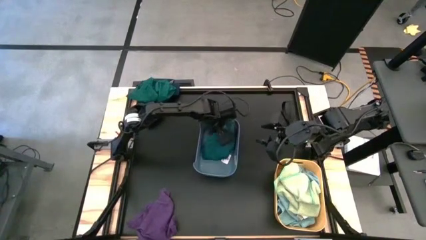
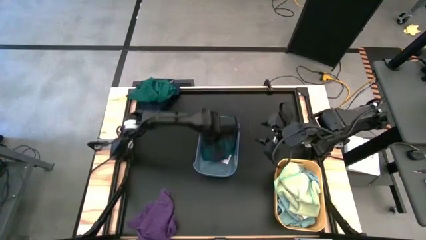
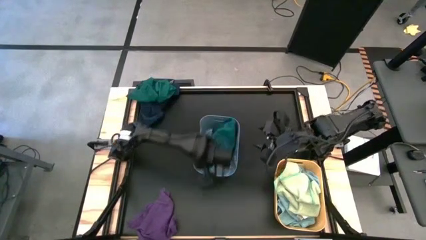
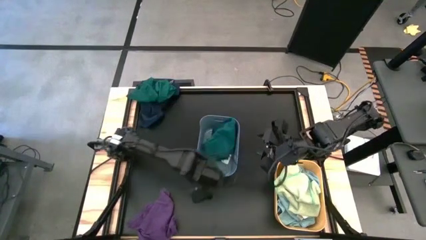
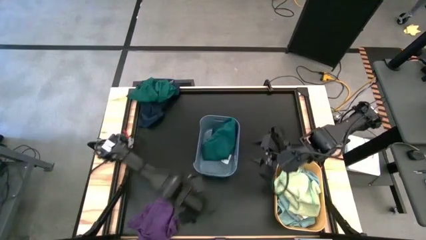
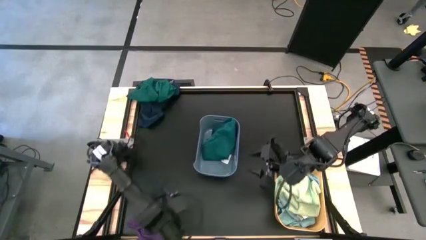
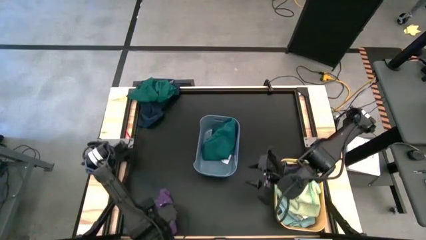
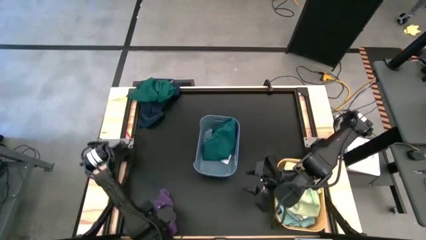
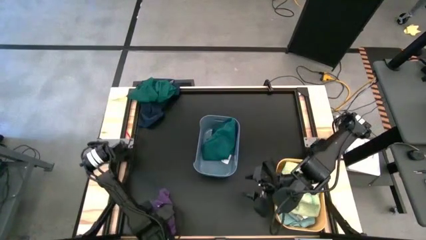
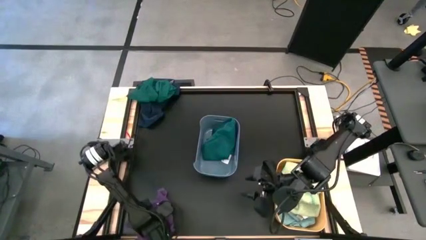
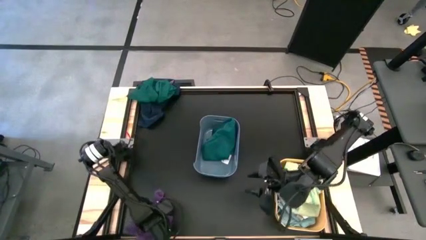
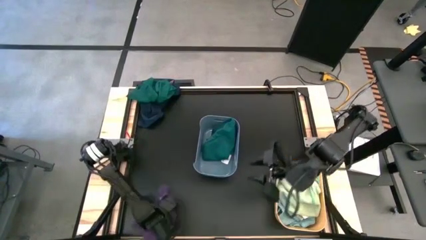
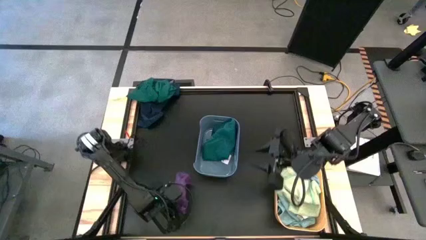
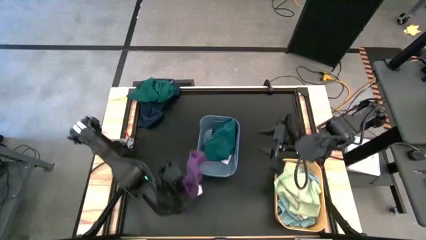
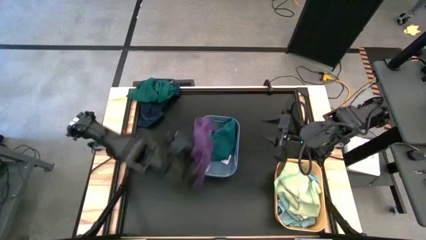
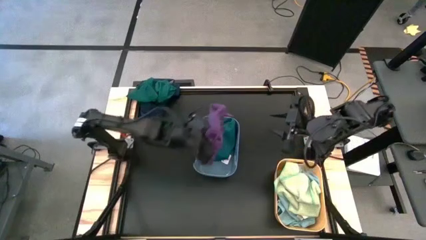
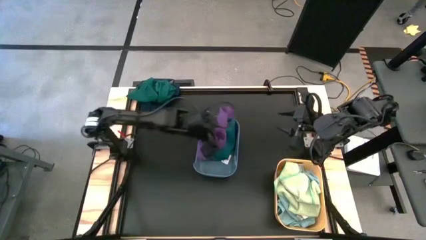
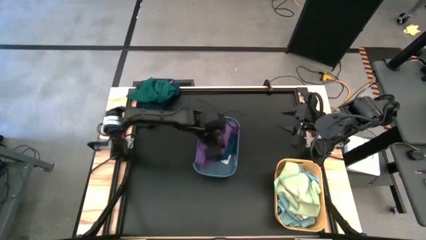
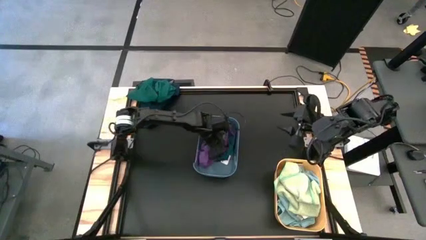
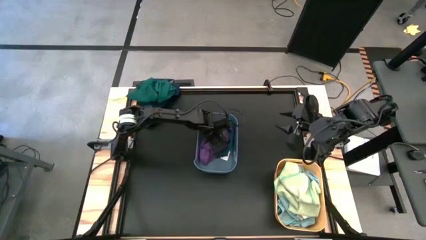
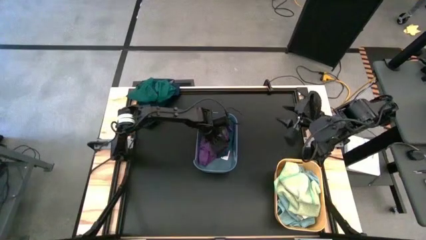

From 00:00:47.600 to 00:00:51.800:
Task: Sort microfiber towel by color & place in baskets
Put the purple microfiber cloth into the blue bin

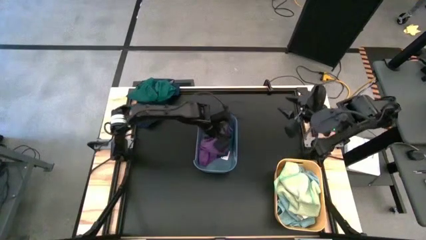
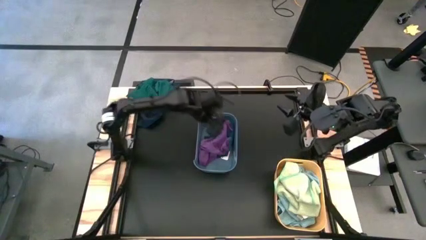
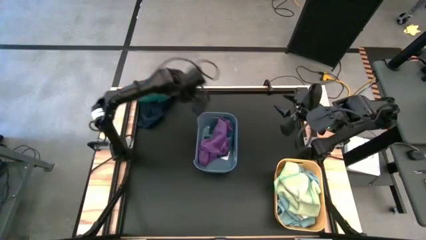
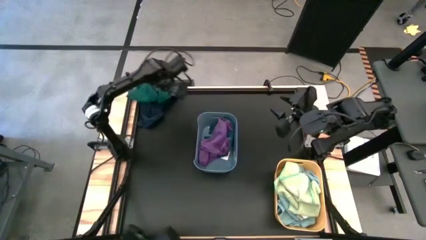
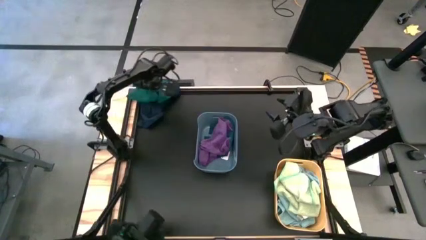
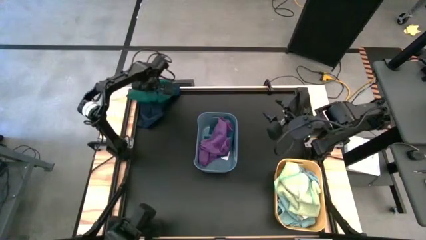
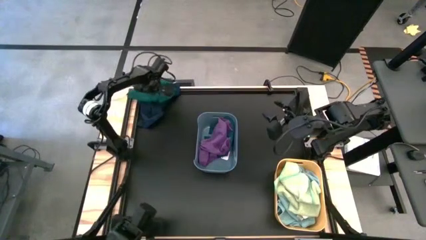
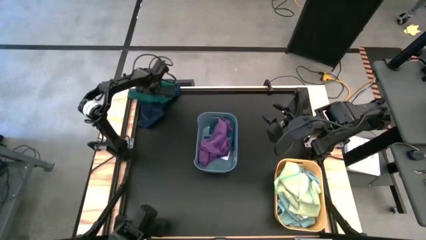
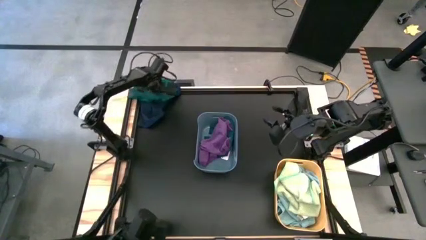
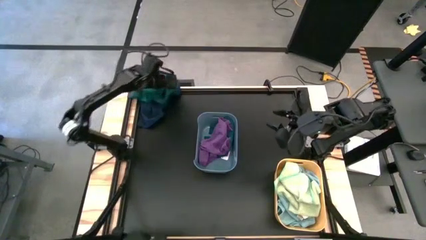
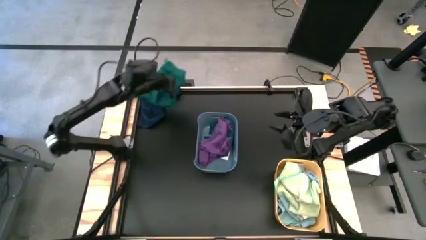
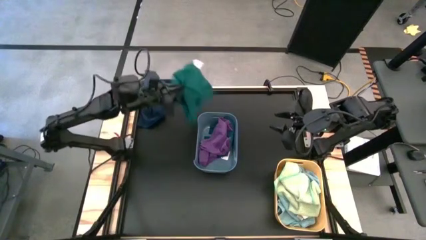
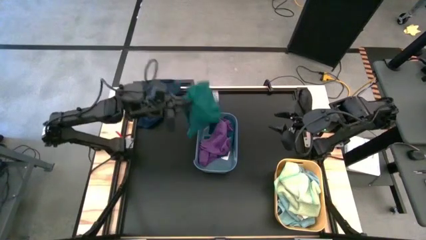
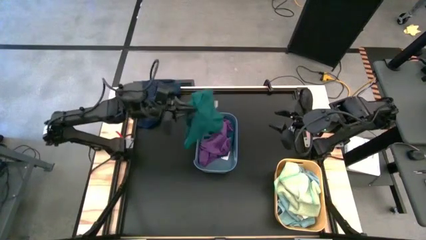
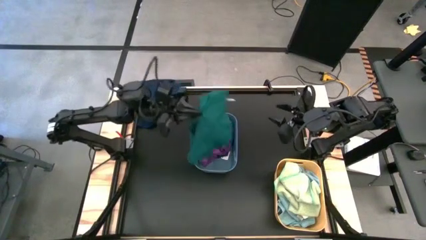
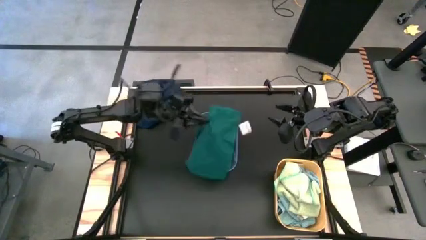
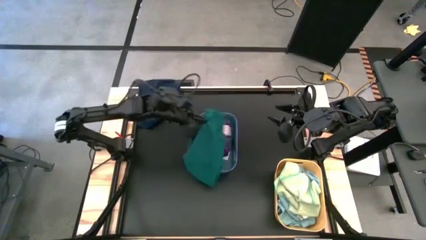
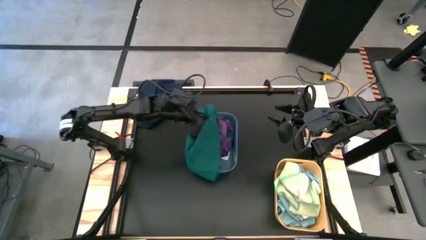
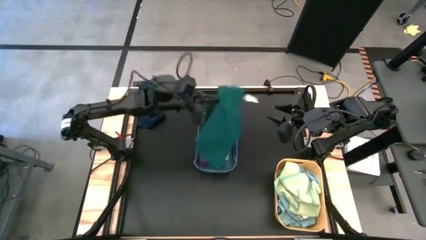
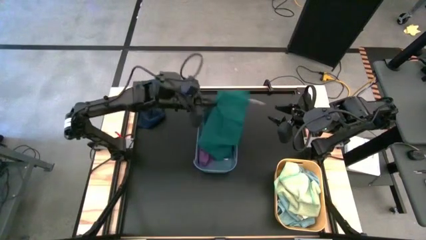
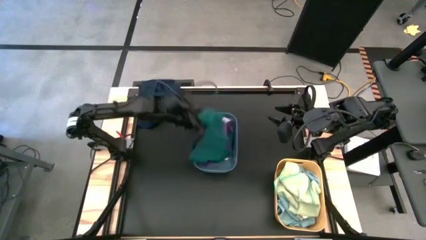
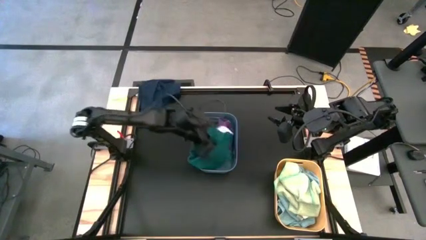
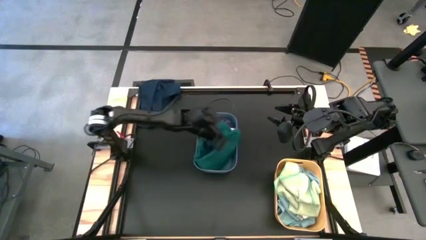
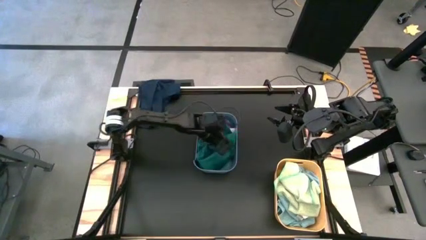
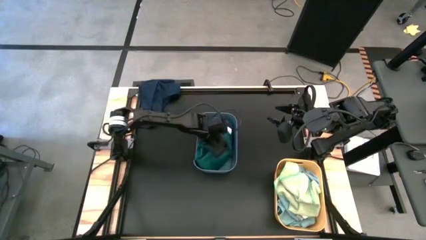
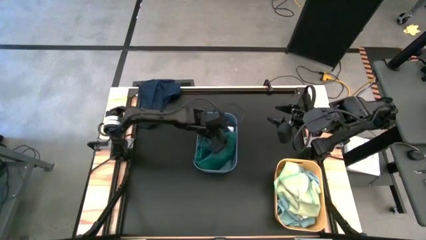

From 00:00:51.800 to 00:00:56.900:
Put the dark green microfiber cloth into the blue bin

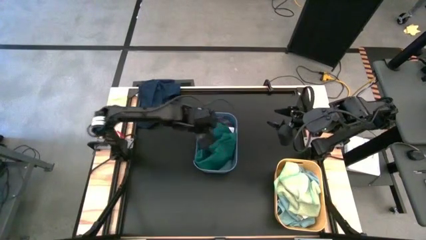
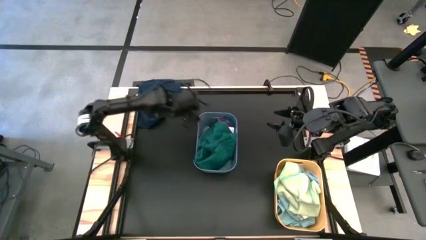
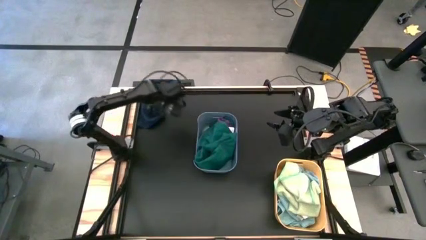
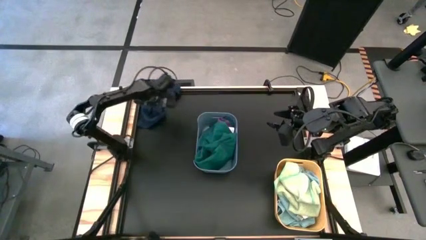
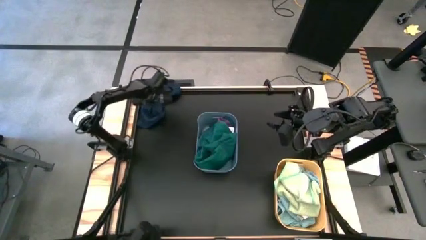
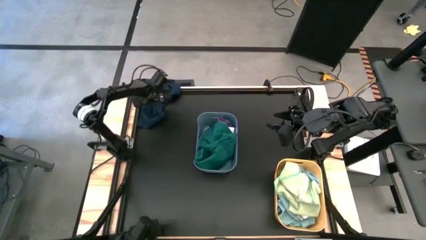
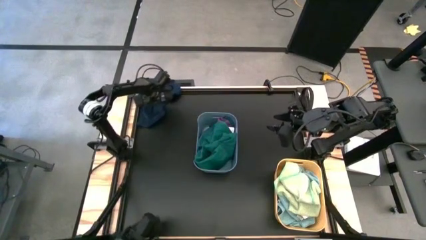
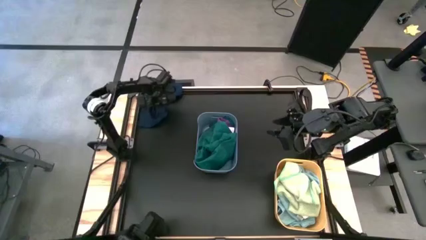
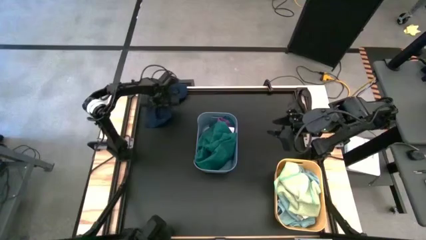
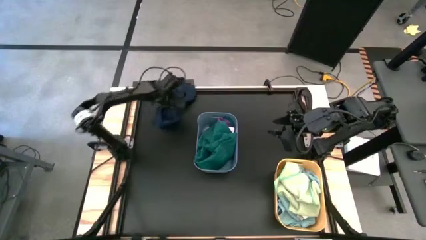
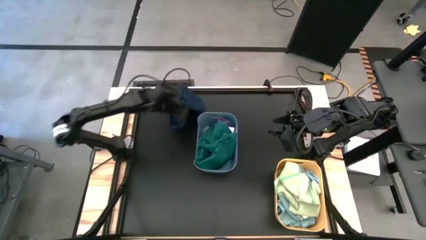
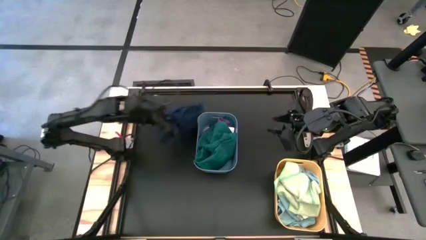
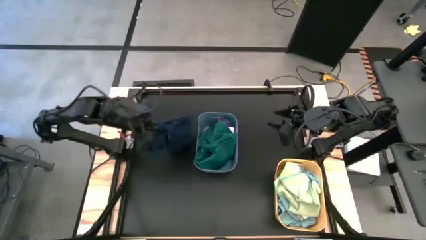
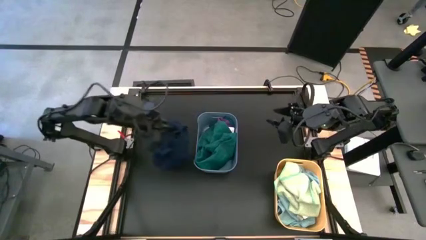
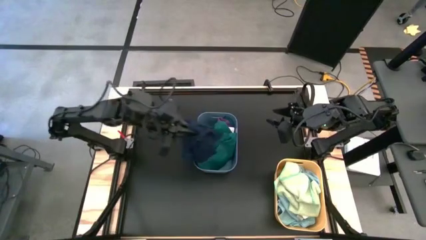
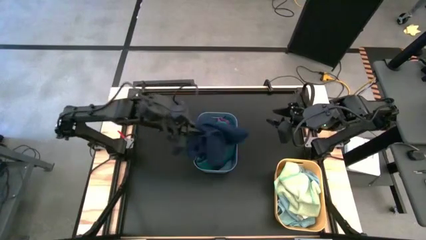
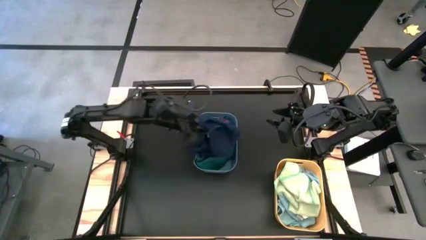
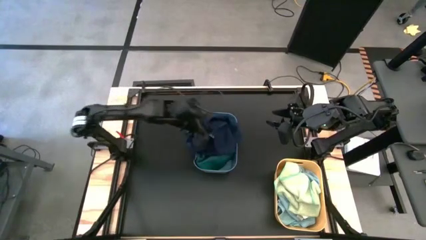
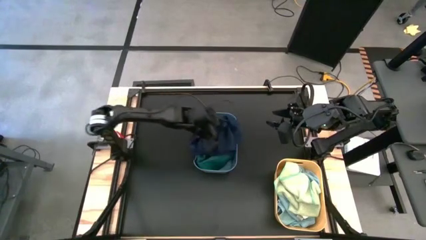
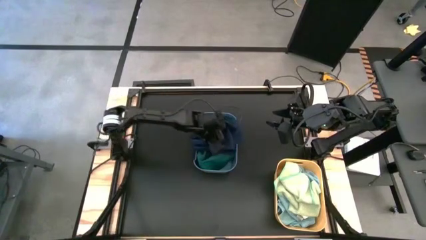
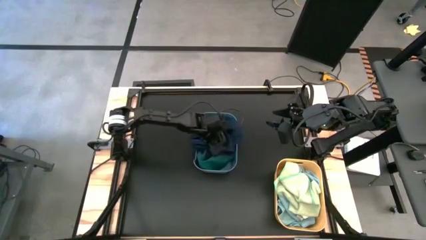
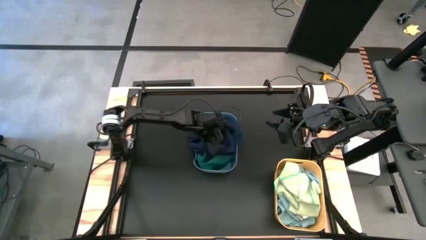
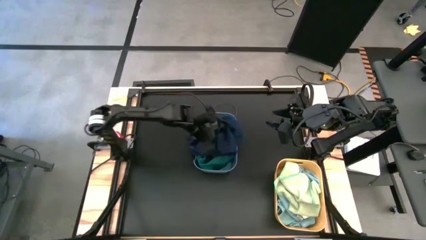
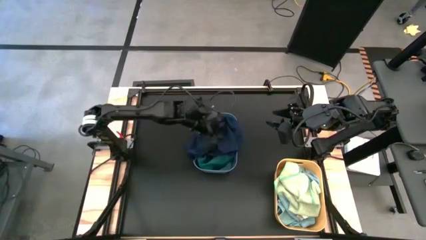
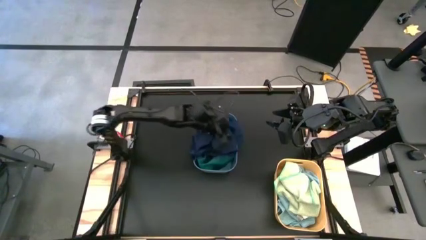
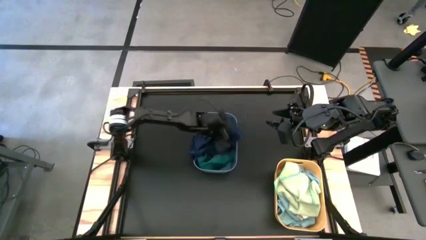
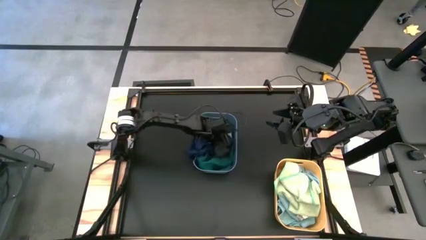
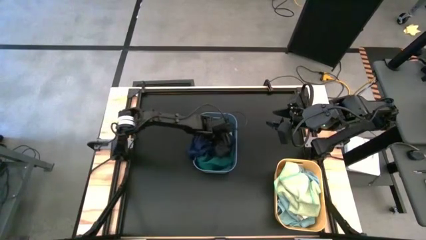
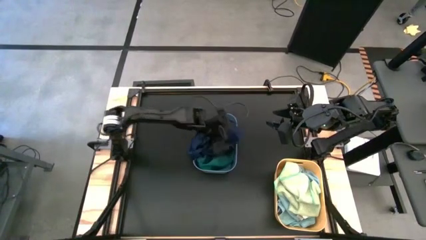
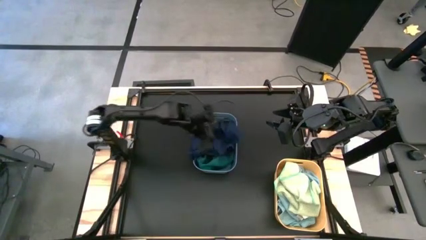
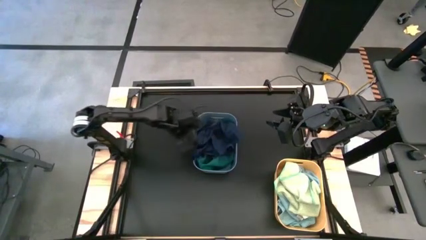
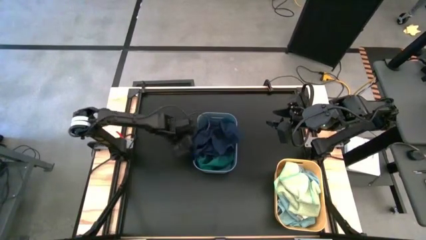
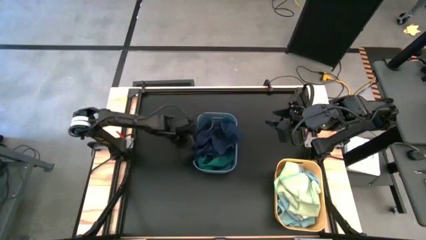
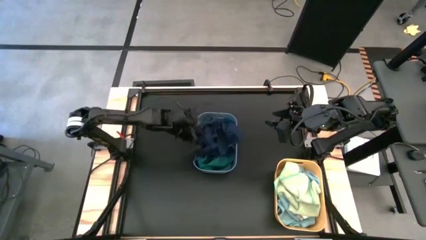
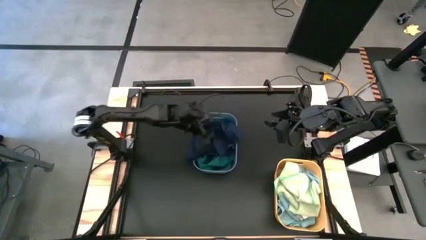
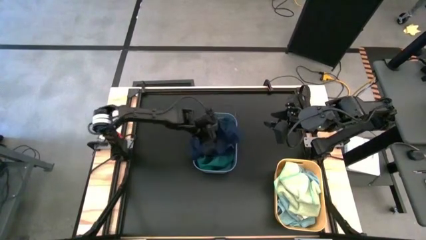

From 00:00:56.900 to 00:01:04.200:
Put the dark blue microfiber cloth into the blue bin
